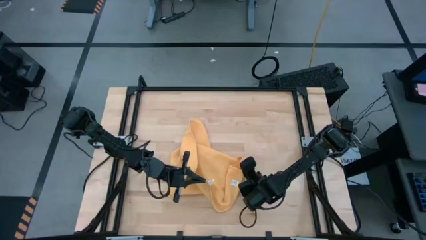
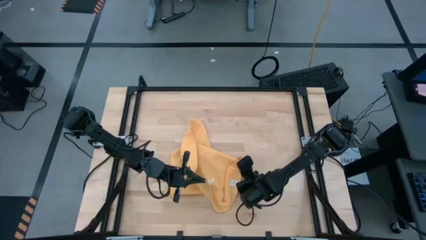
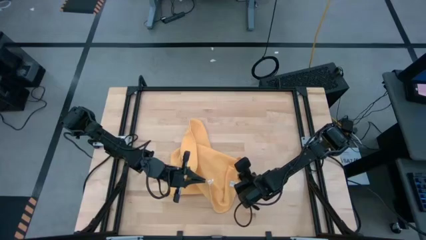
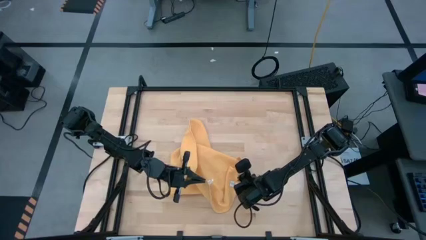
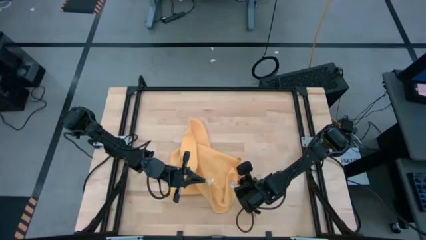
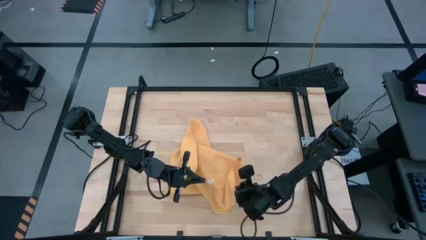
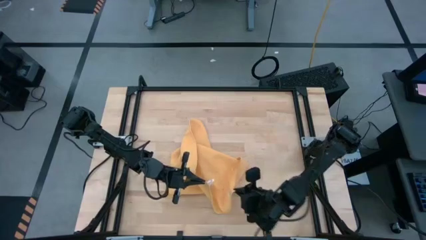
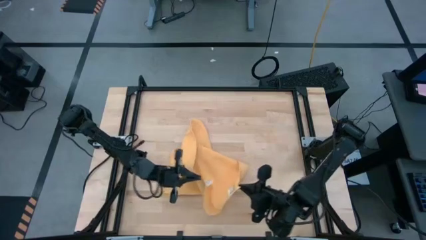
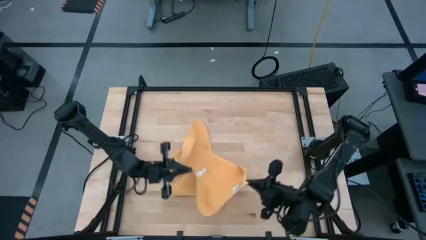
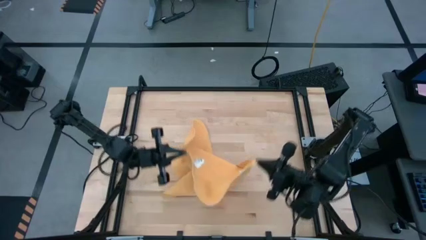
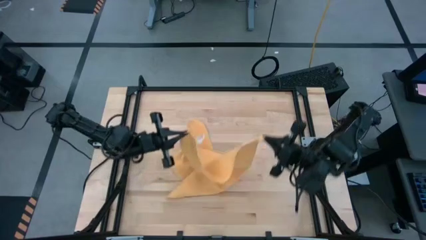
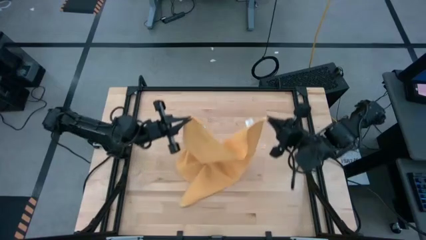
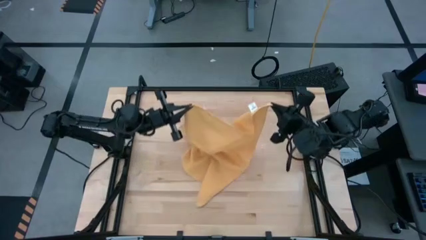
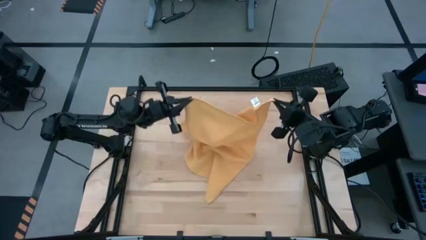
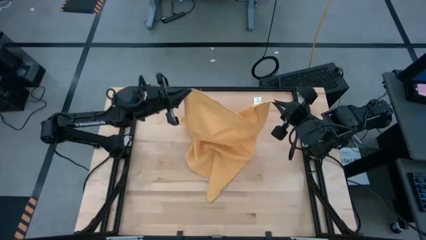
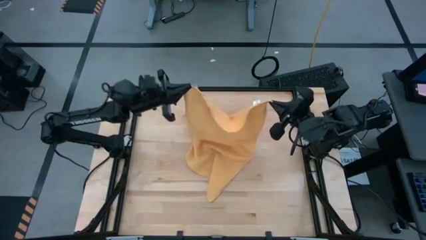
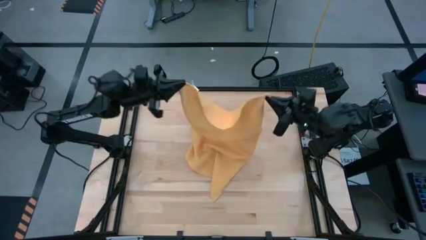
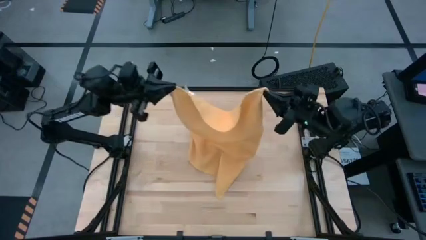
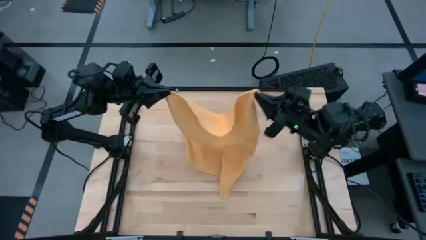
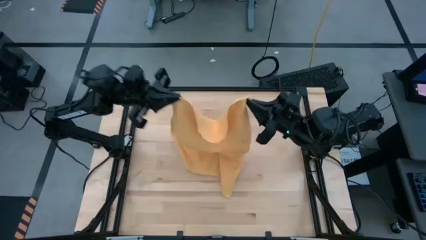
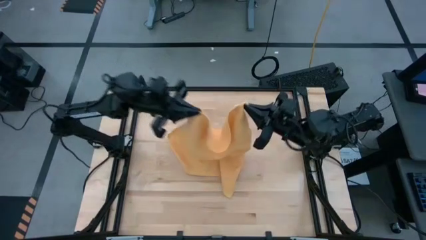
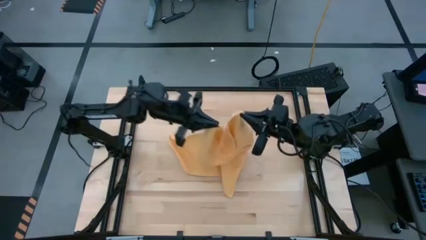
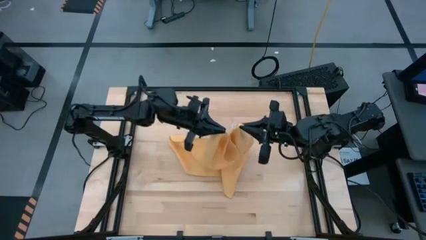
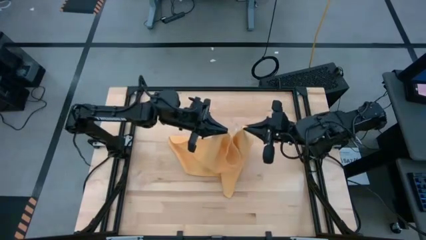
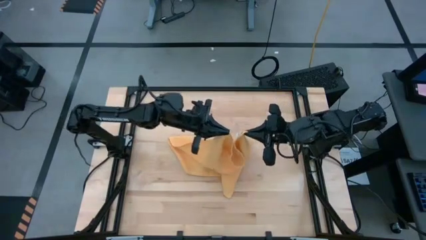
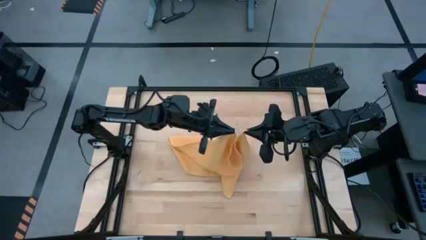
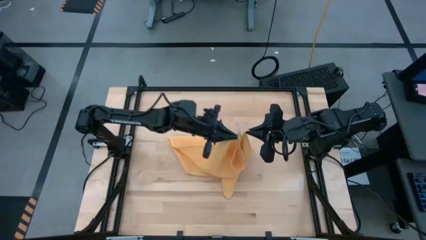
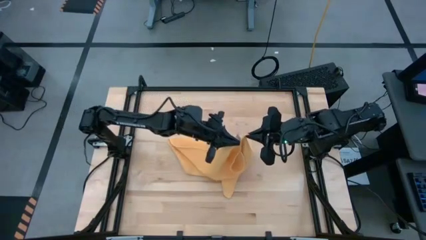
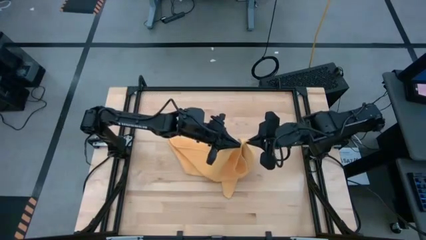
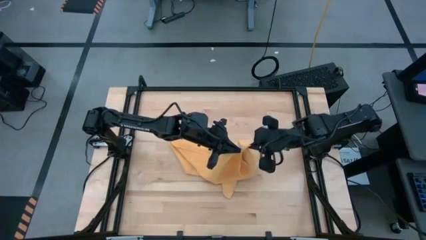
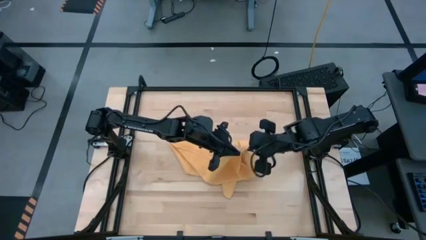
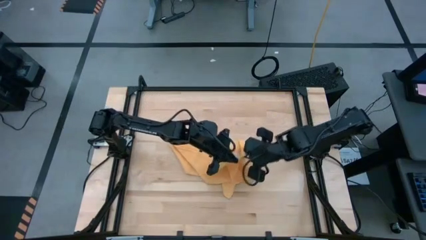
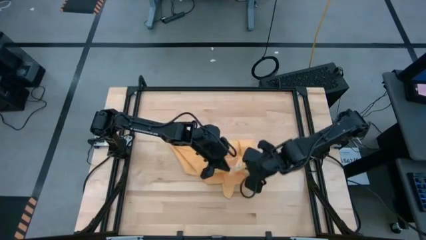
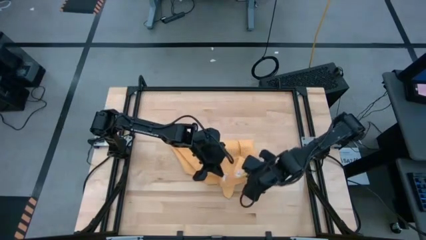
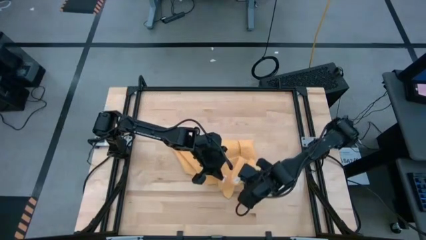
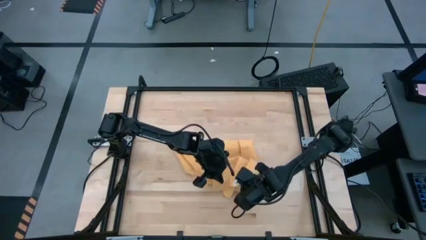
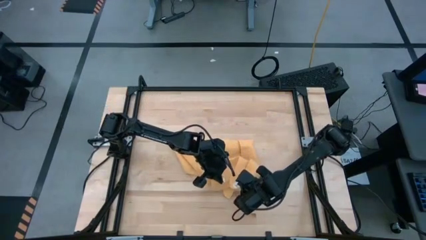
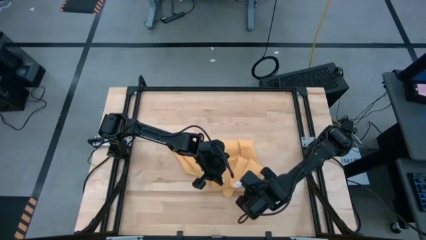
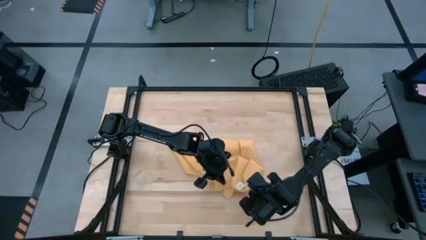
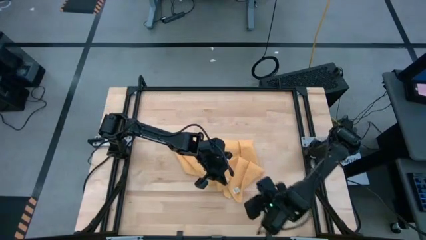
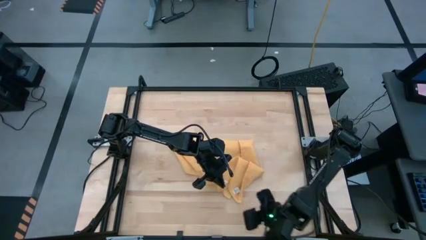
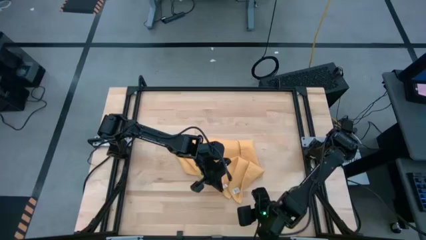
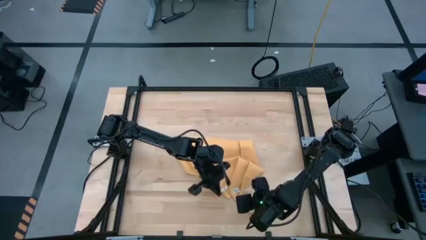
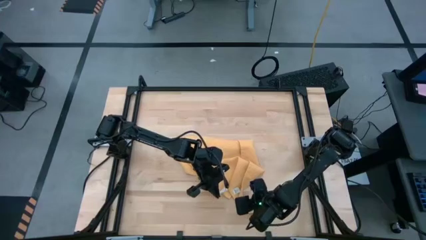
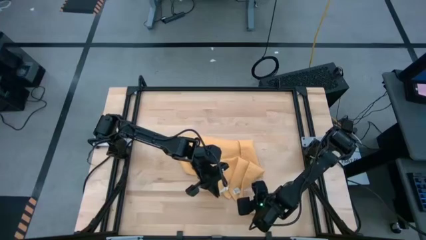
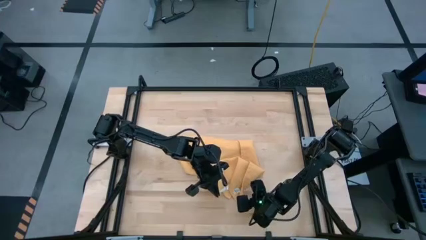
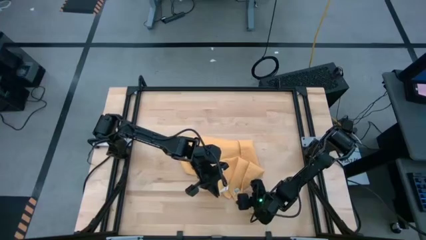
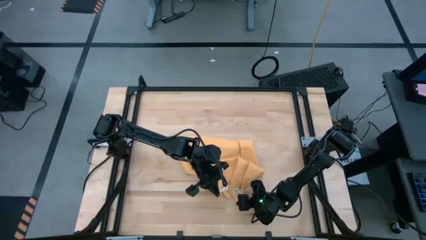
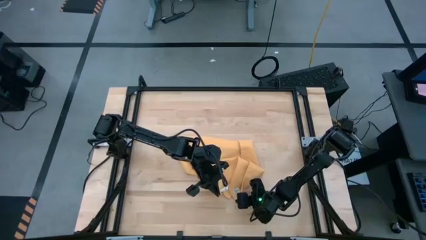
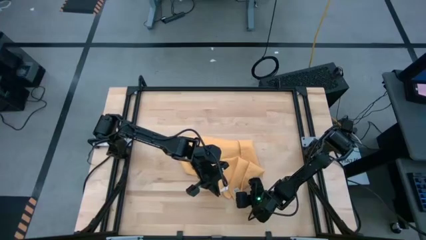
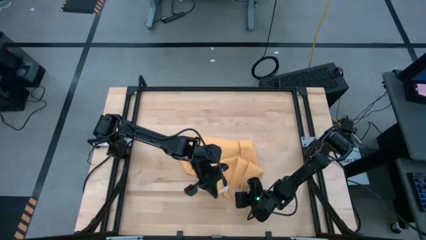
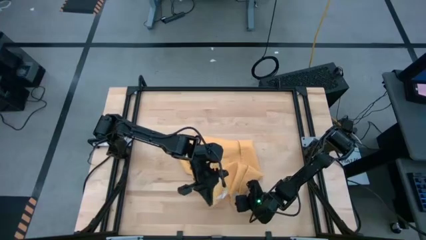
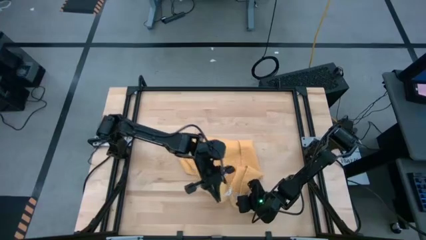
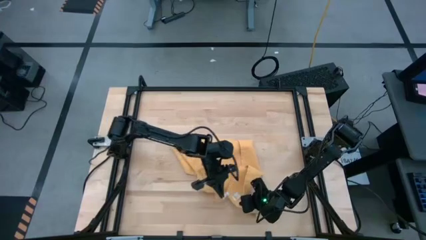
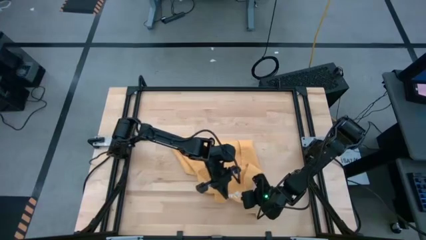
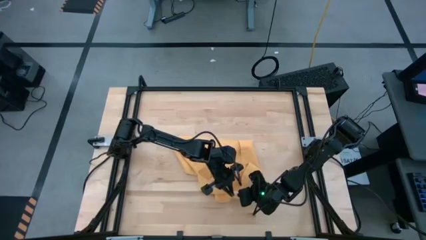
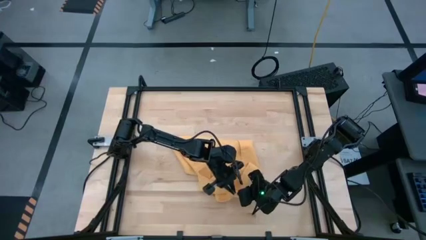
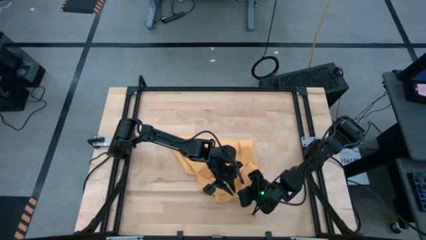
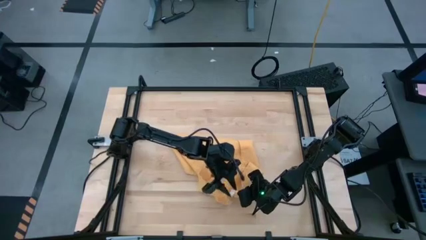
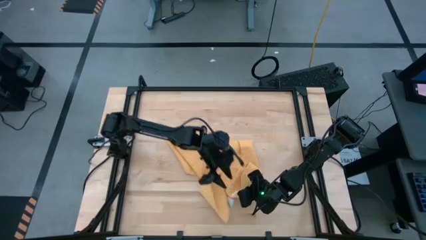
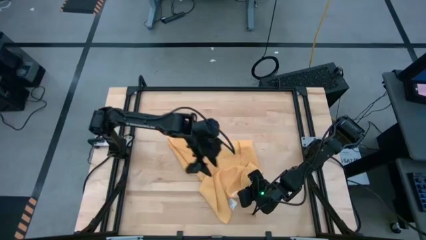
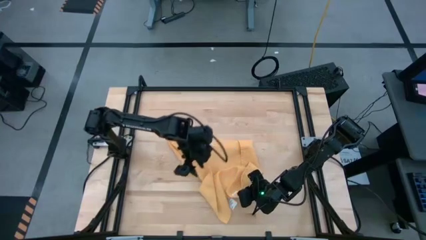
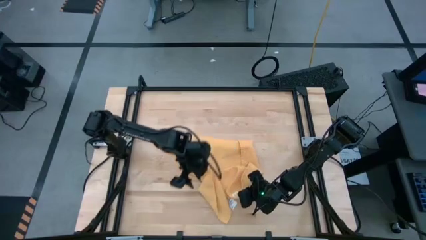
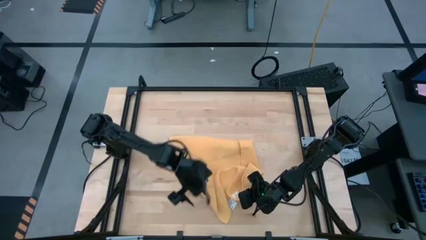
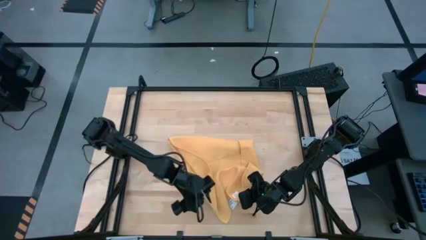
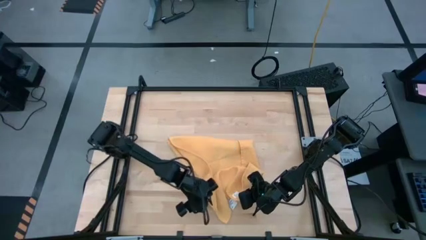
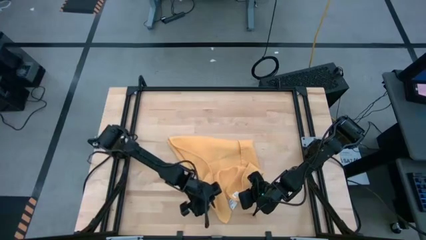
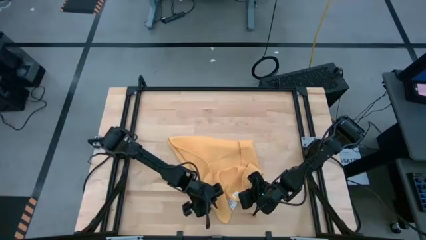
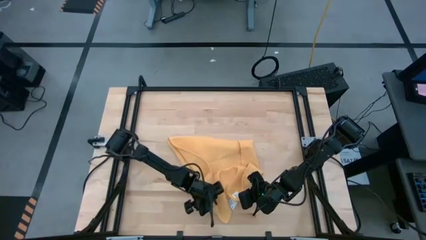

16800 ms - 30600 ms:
Task: Roll towel
Roll the yellow towel

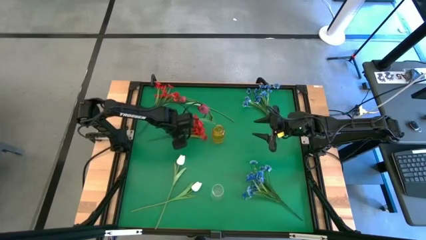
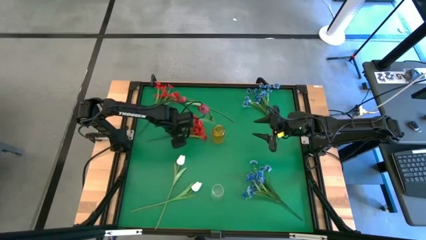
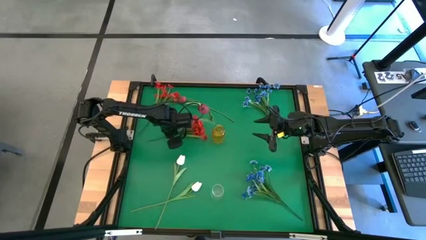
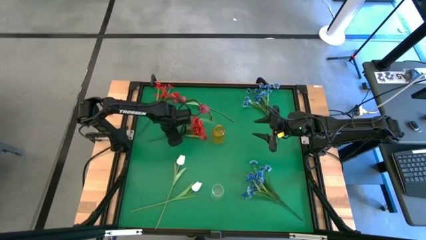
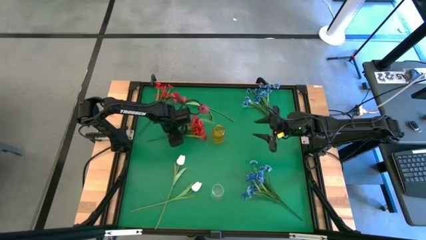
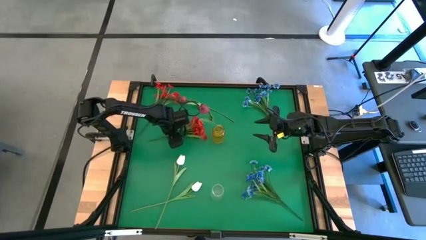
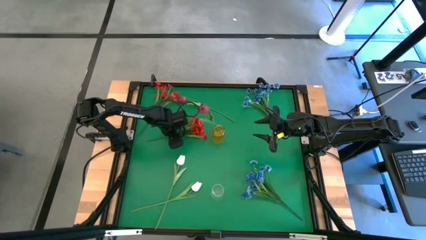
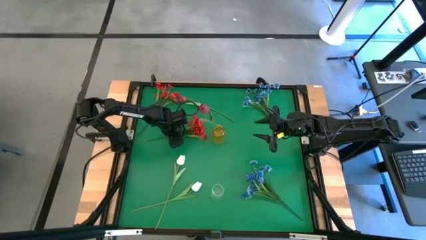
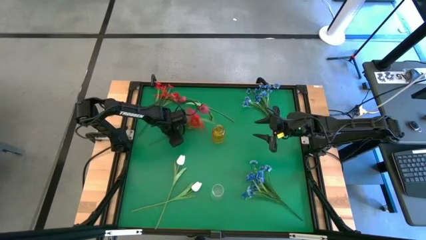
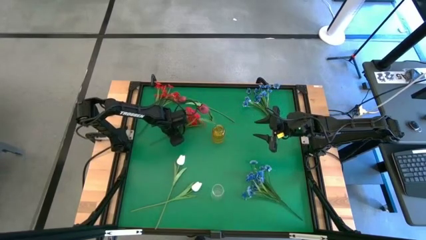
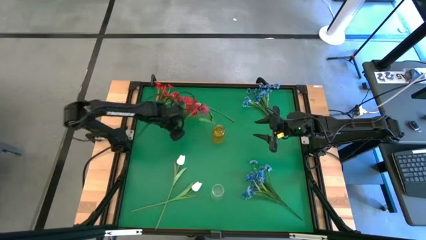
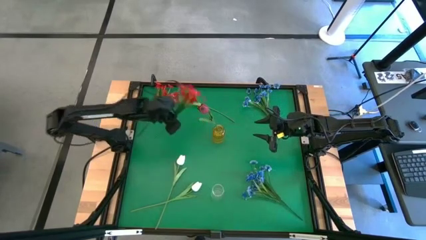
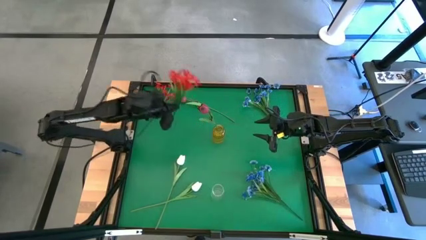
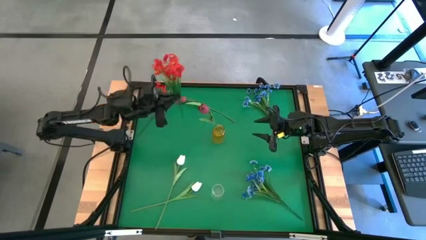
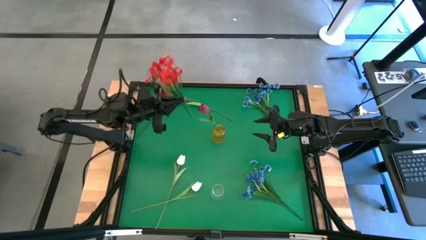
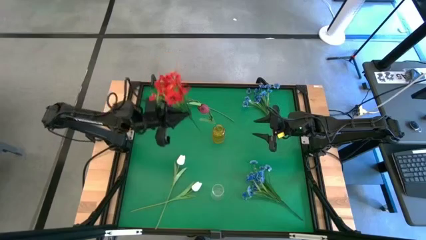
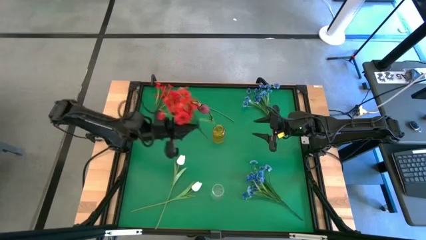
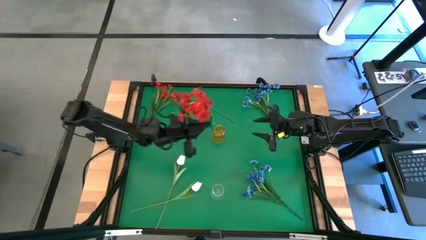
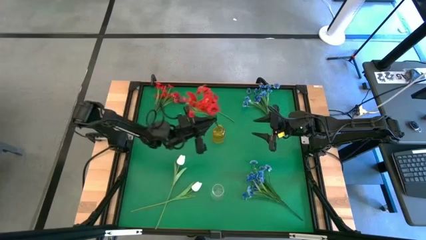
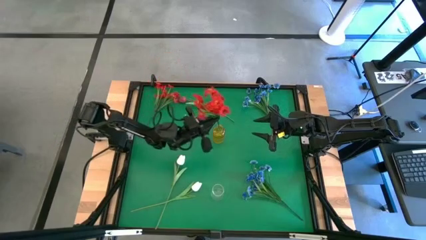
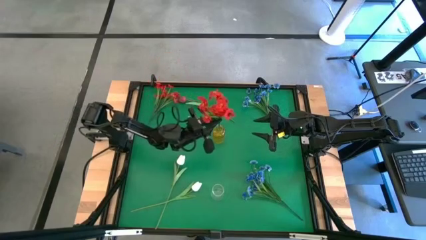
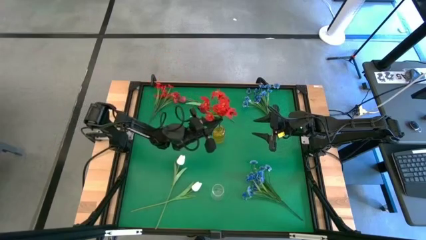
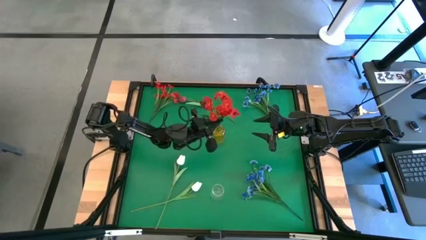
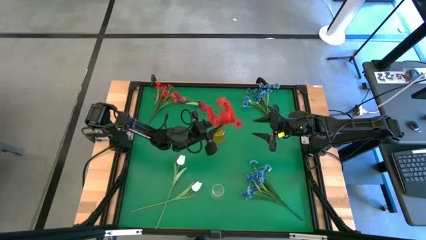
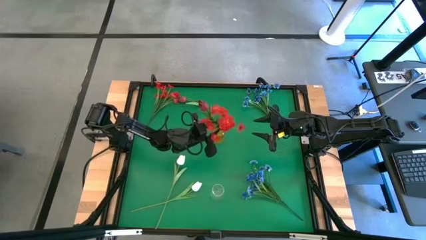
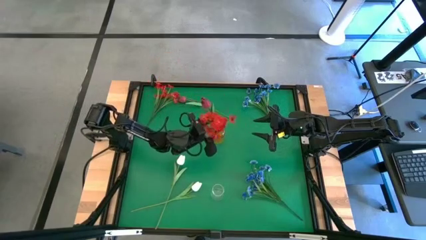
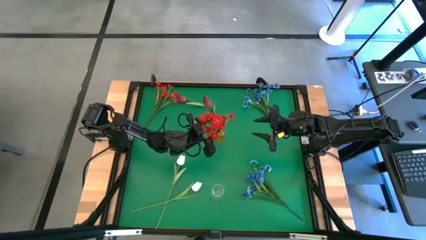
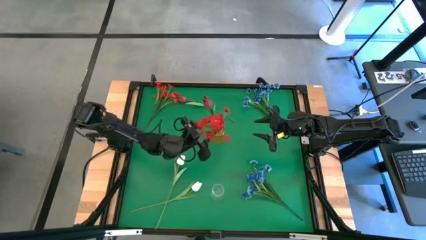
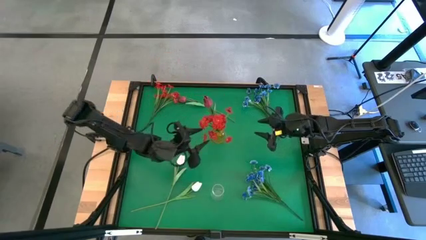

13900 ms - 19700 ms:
Task: Sort flowers into vase by color
Put the bottom orange flowers into the yellow vase
